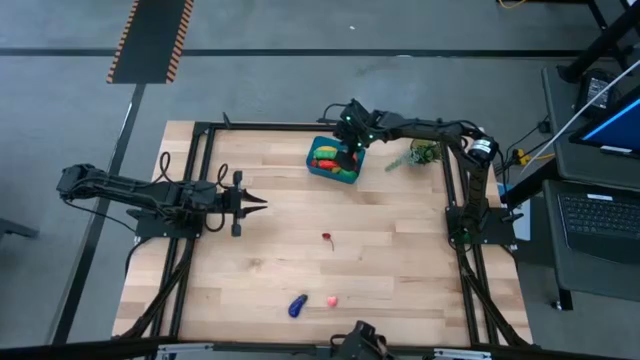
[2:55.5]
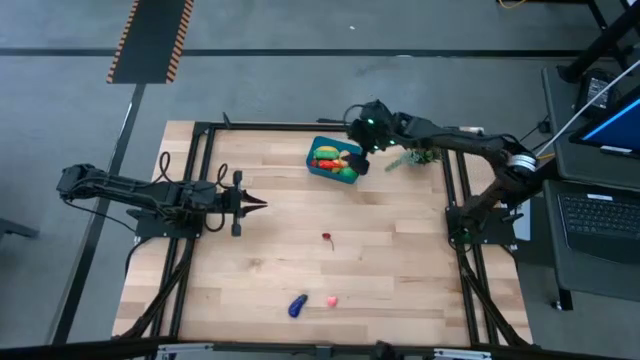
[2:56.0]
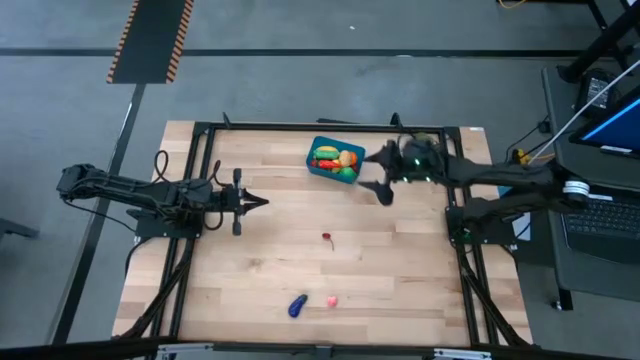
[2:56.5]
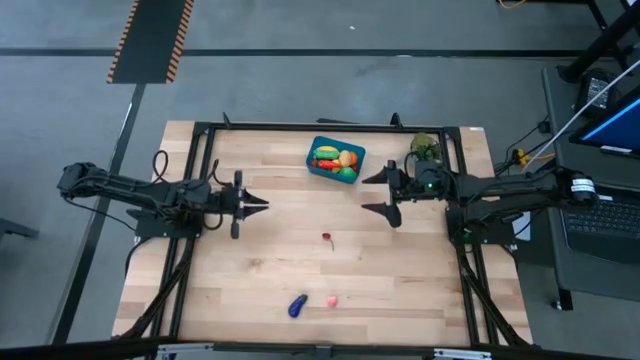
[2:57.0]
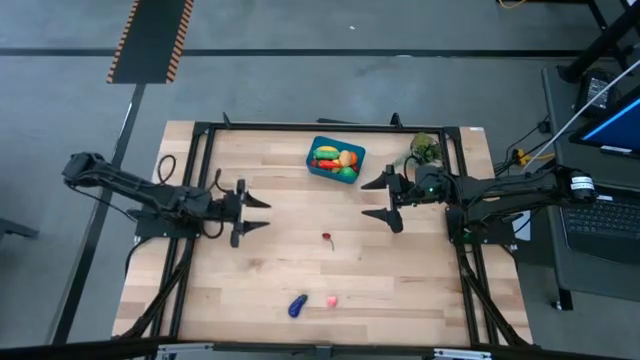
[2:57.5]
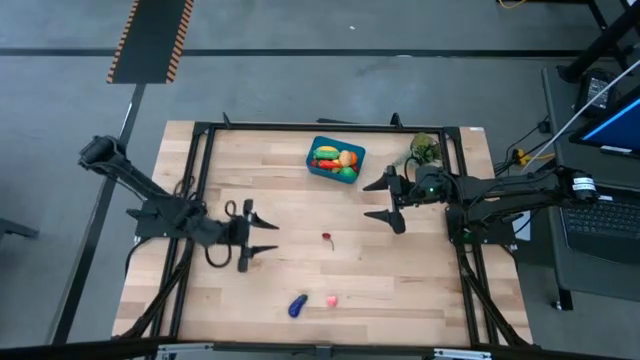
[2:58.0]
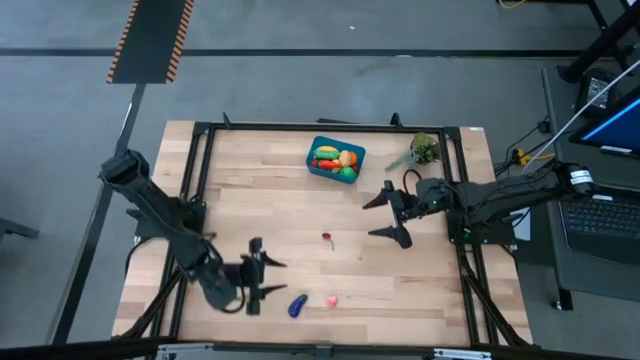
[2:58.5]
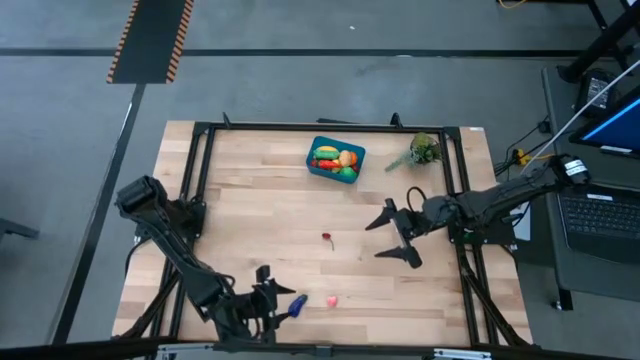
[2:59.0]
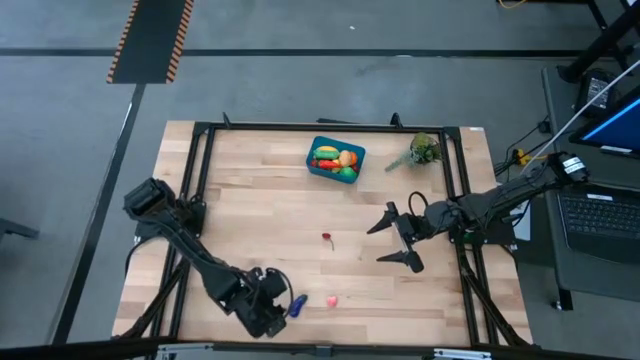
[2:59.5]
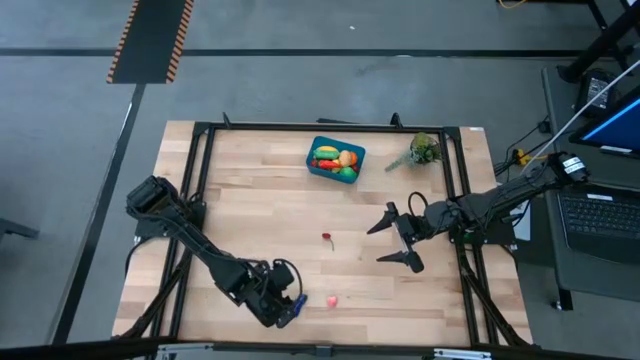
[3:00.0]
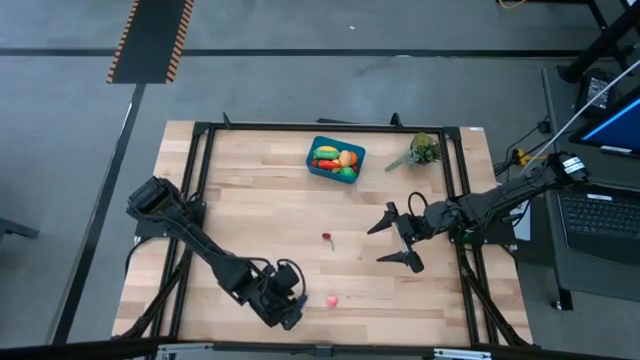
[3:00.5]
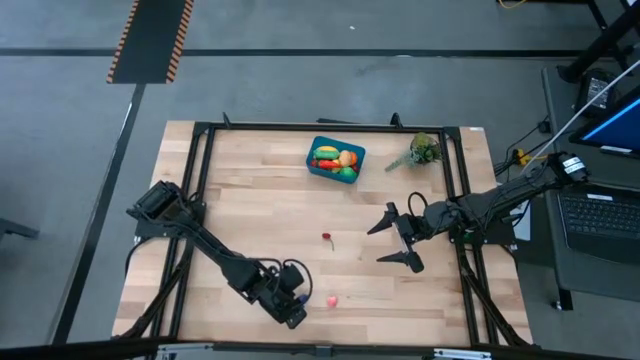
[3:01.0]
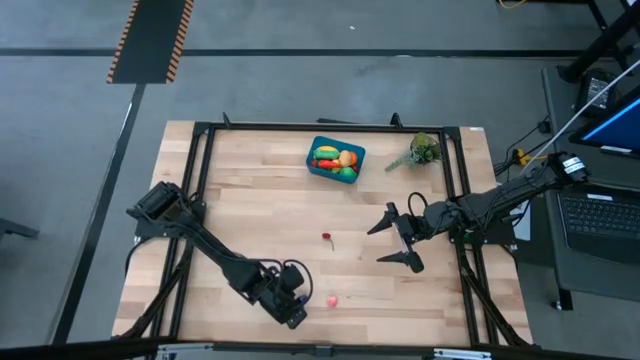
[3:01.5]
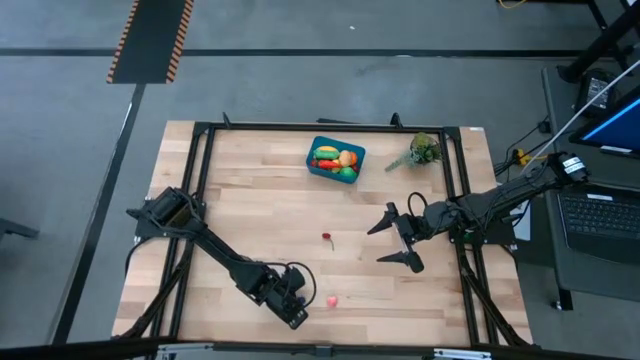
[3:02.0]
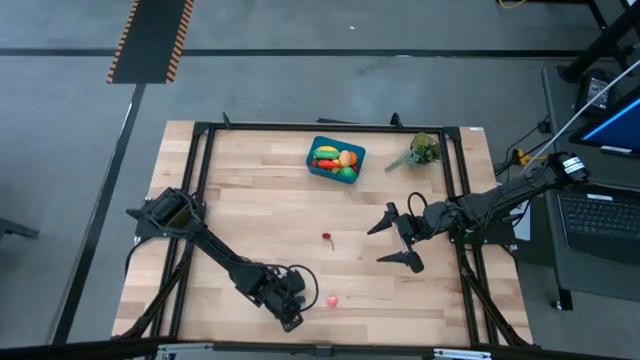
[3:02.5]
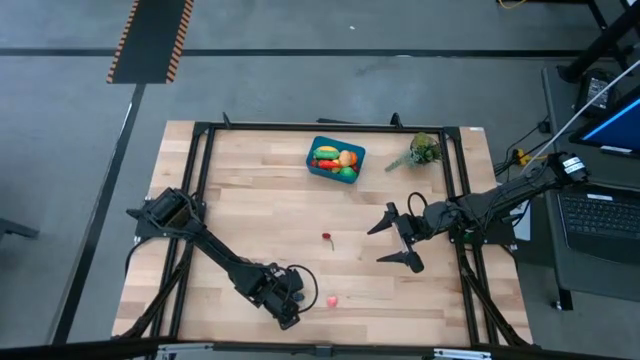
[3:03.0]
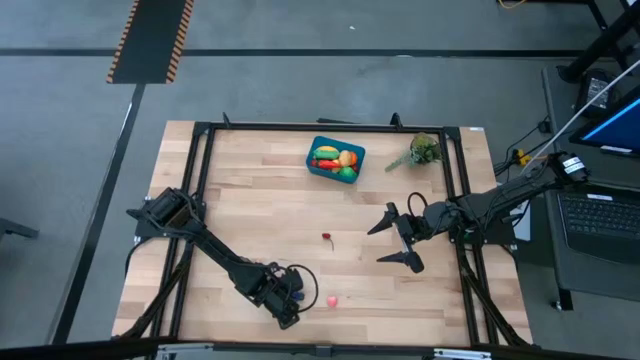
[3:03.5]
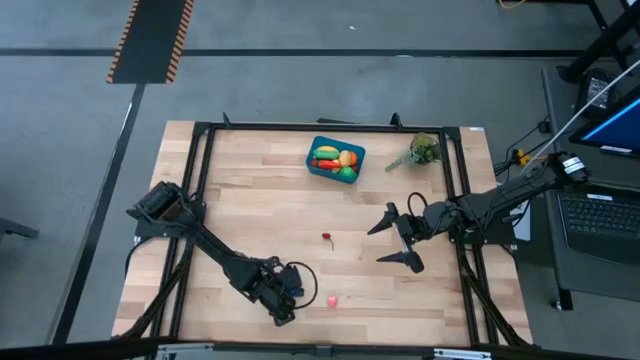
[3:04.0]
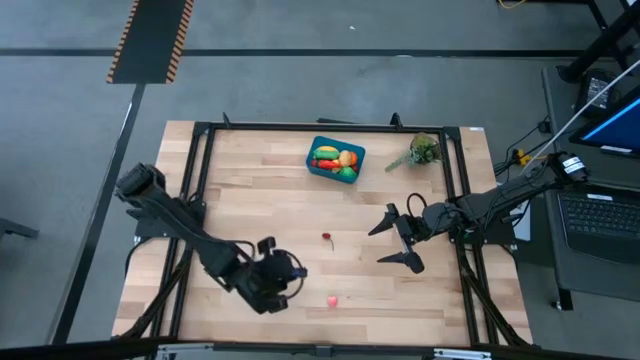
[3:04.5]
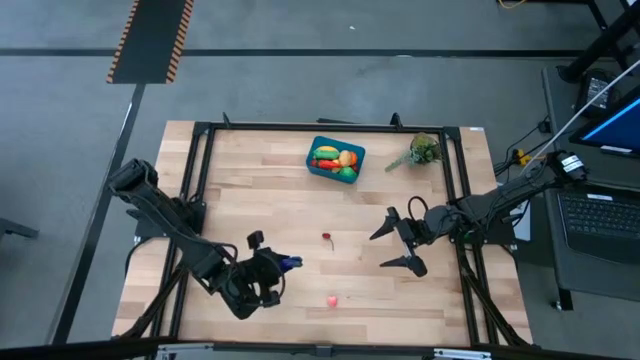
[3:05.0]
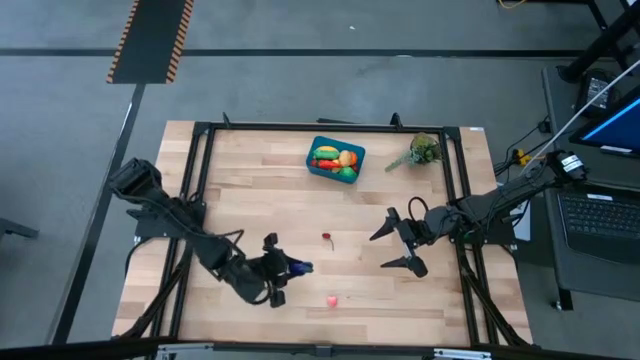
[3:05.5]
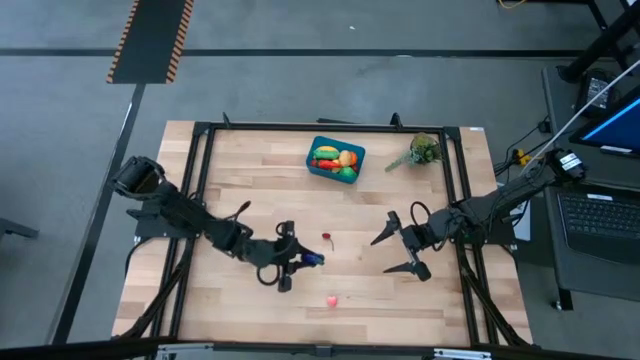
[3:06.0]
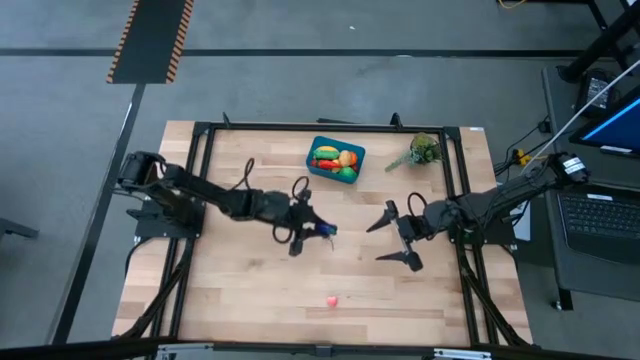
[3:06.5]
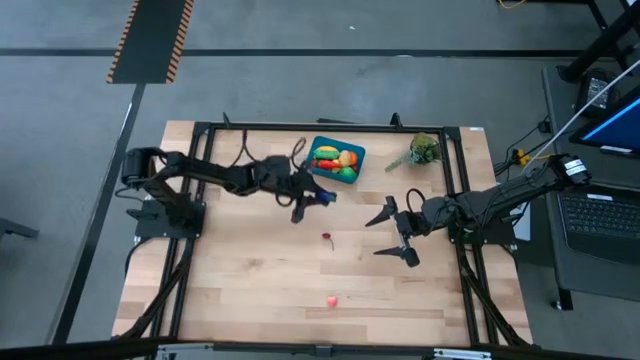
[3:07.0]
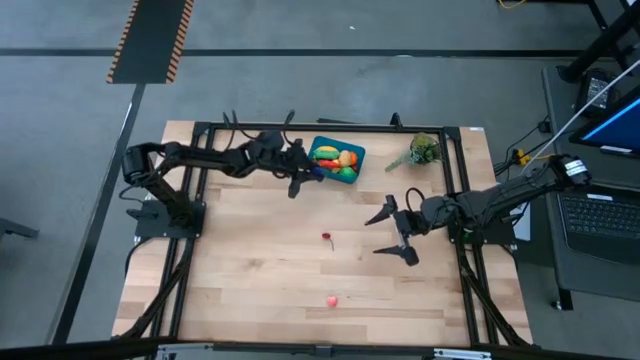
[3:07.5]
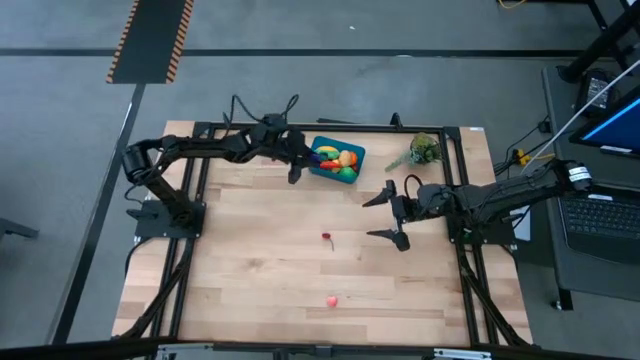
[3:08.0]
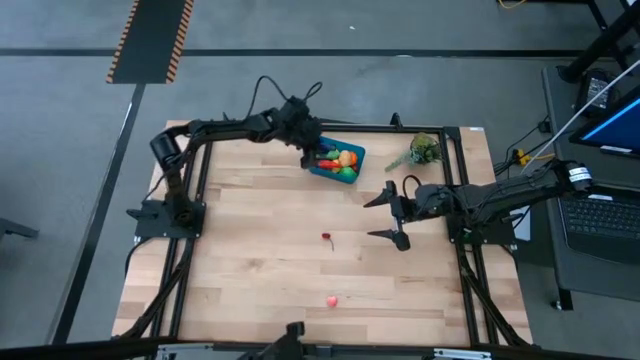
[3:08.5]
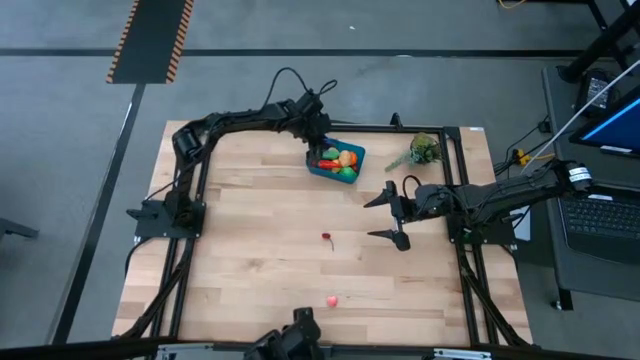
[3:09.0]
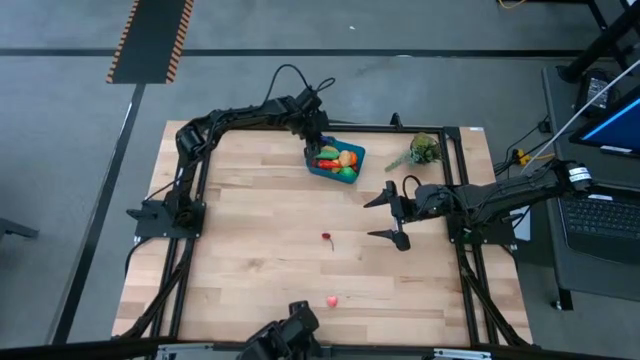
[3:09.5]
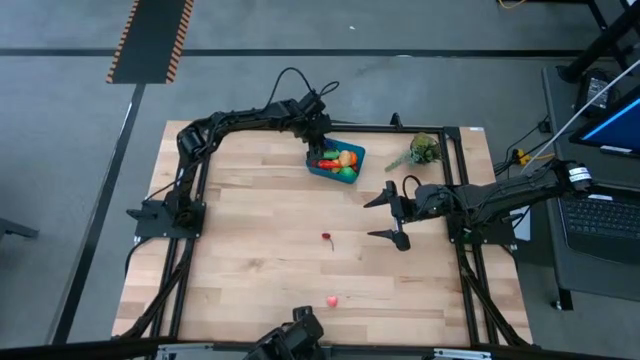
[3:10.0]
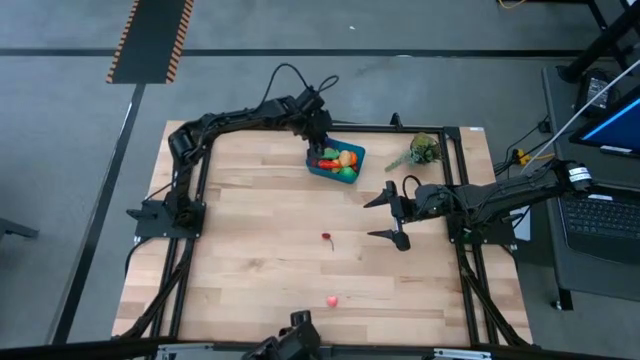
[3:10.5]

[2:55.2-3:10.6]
Task: Pick and placing Produce into tupperware
Put the blue eggplant into the blue bin
